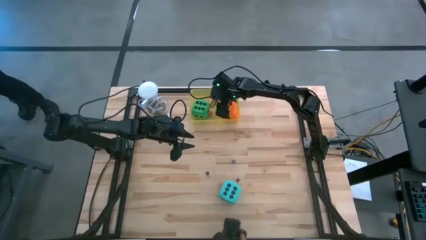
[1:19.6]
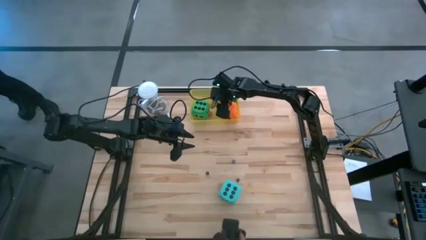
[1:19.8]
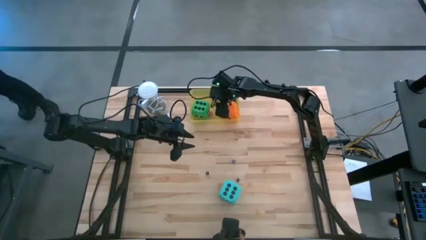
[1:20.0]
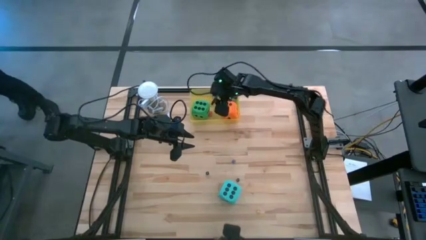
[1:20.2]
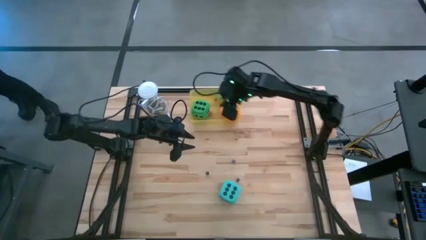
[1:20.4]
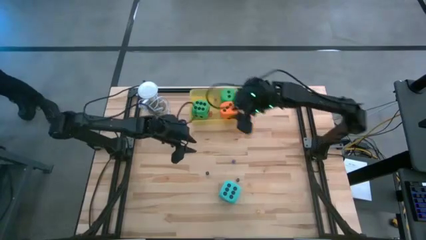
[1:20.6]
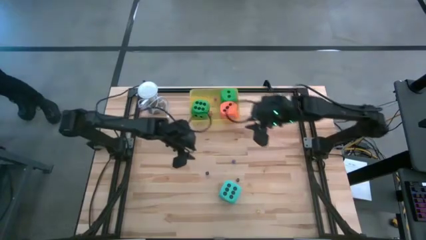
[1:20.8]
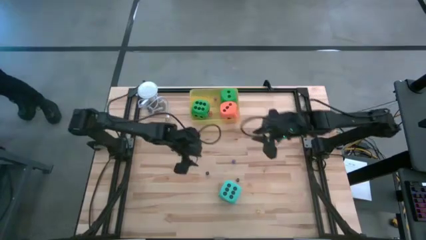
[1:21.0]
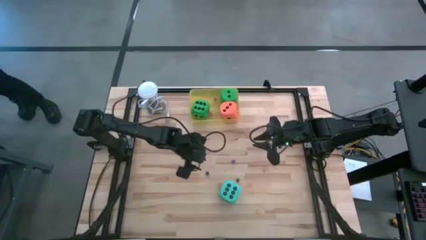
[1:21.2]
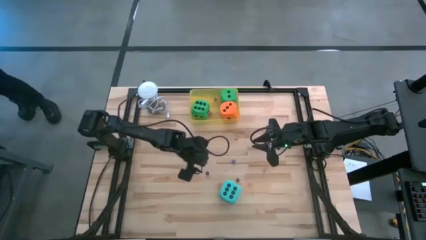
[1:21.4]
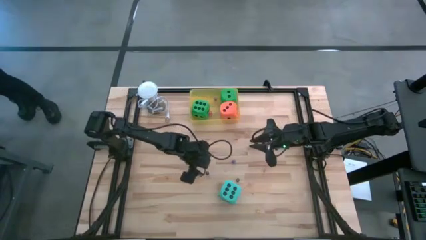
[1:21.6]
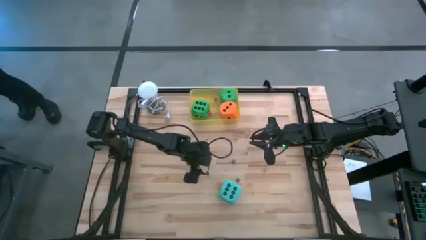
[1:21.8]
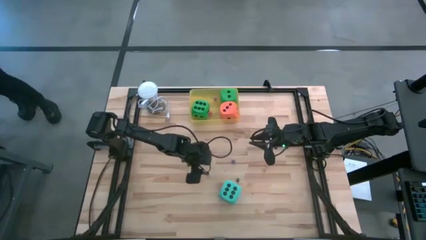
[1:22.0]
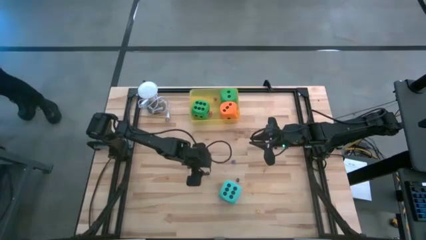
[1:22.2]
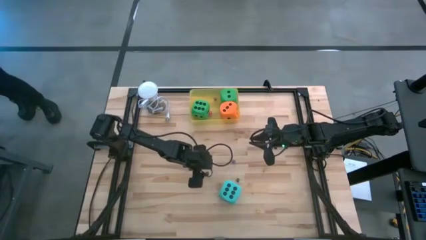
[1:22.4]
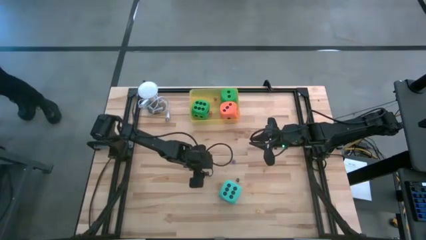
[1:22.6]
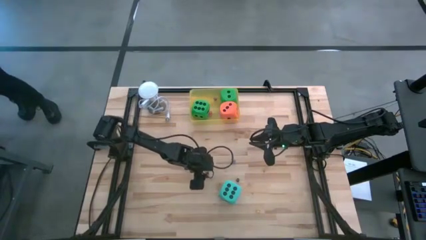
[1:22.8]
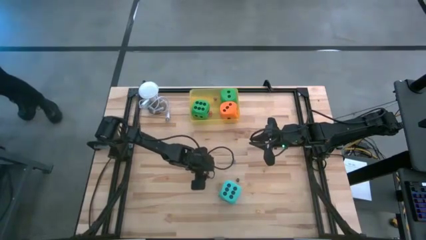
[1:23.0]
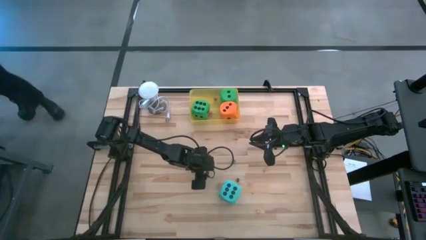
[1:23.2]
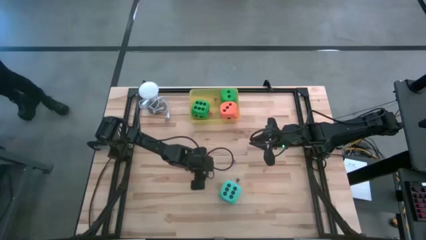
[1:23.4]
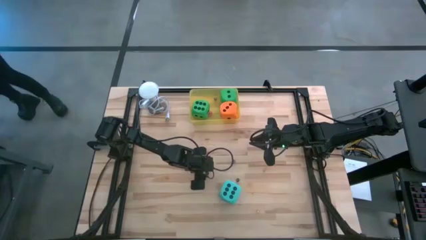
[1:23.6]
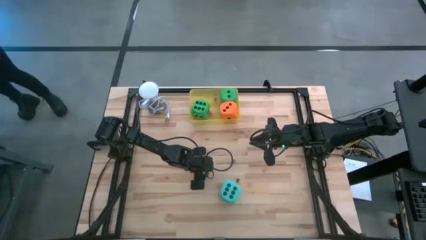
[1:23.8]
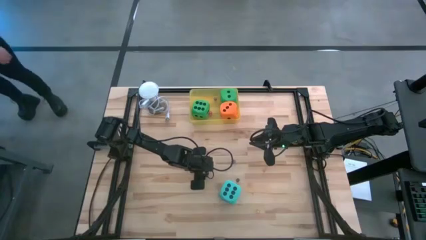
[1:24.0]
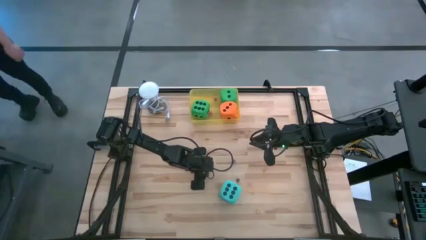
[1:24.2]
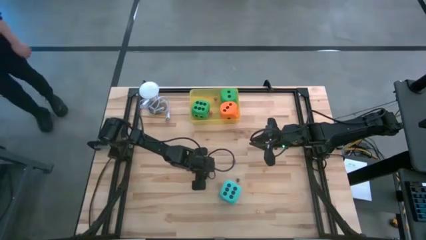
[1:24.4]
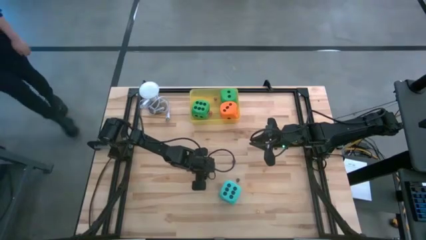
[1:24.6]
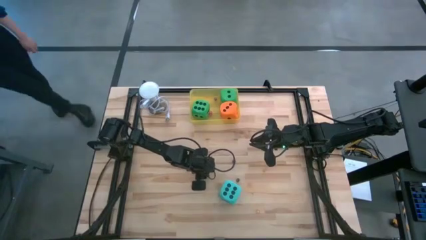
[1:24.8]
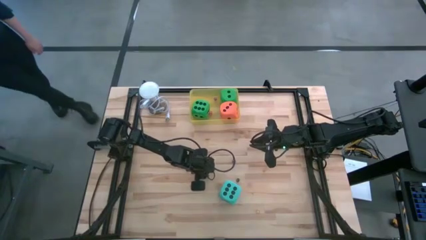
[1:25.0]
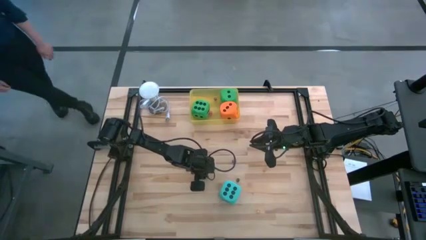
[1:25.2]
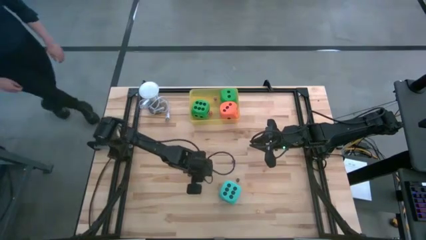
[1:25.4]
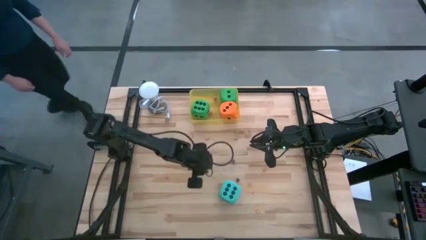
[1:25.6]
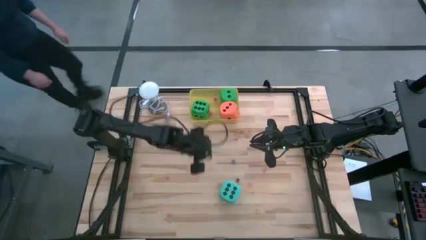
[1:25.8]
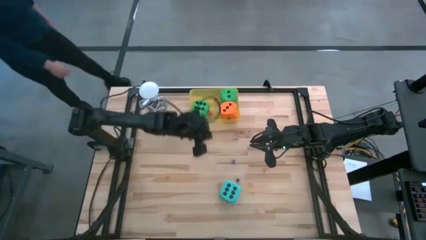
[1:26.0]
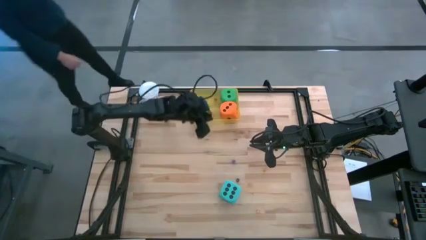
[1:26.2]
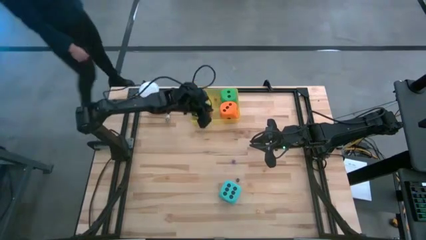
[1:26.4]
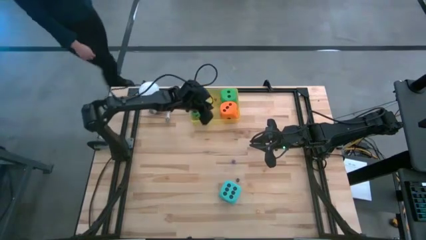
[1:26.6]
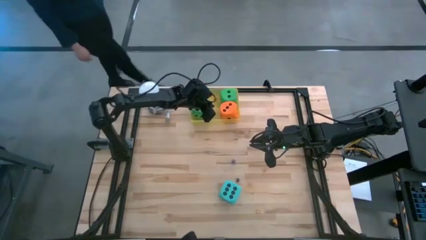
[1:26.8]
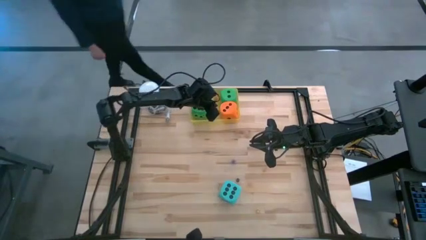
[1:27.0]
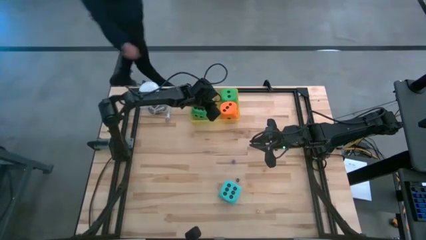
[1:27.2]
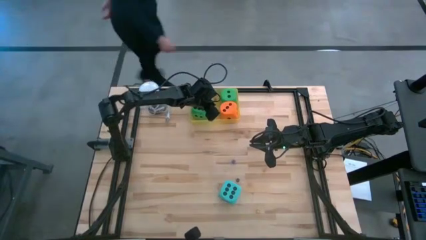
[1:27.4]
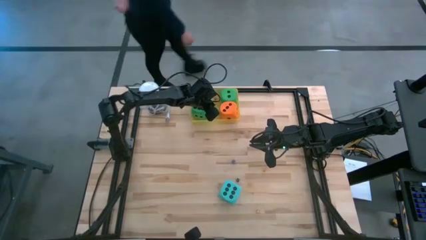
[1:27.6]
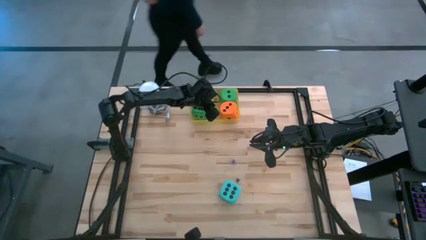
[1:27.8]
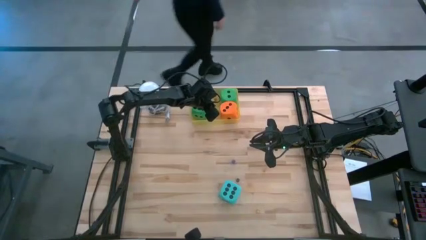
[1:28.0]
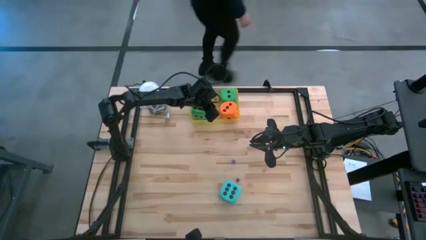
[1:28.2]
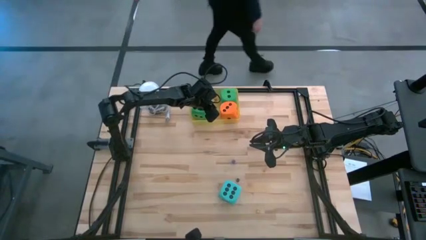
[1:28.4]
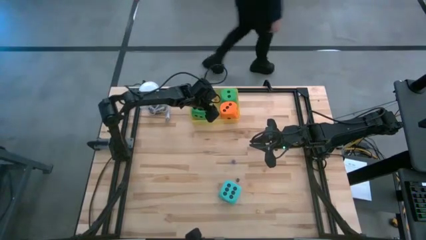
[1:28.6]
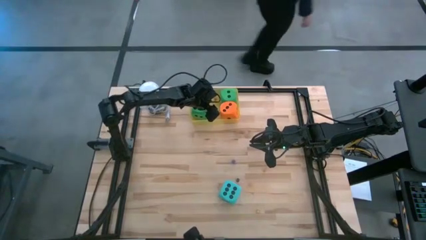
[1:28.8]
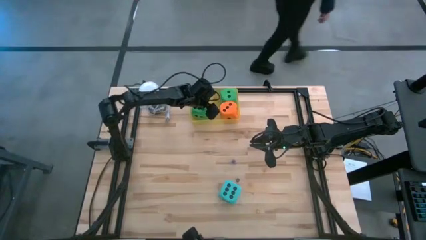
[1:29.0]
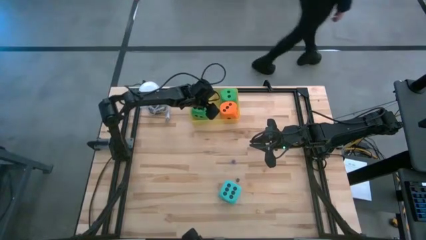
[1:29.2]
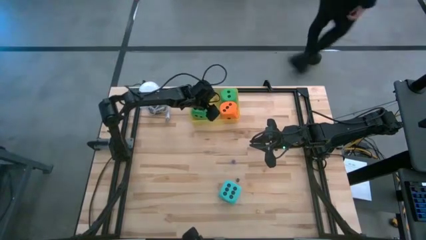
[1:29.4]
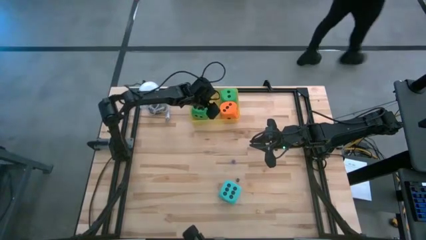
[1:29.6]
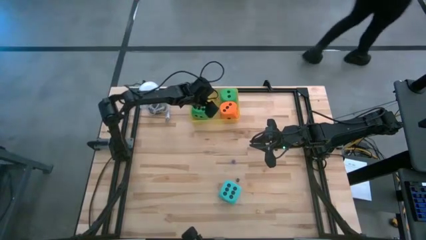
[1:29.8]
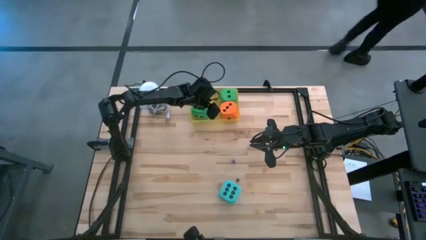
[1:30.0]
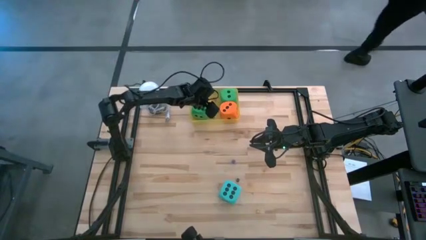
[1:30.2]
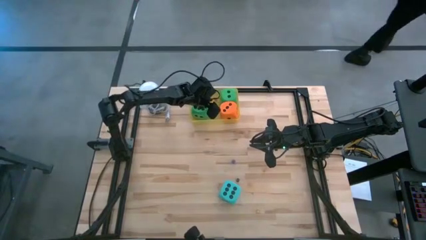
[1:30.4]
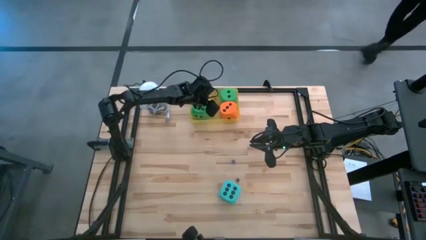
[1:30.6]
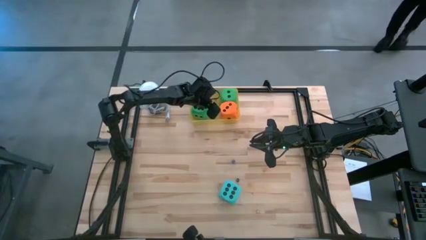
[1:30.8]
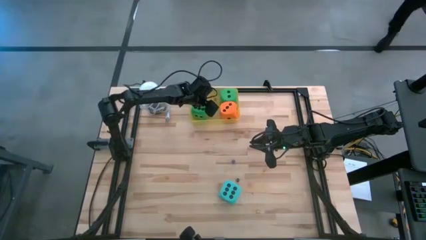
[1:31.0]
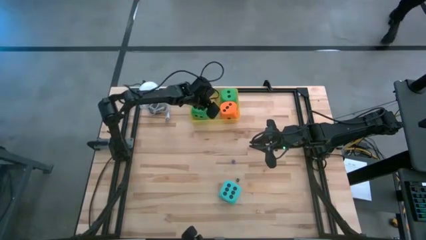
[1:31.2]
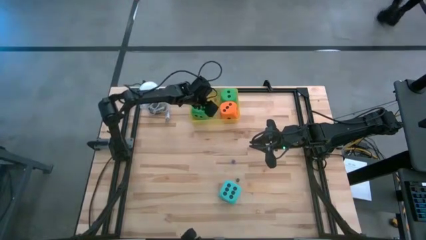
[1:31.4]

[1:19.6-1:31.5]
Task: Pick & Place Dice
Put the left black small die into the yellow bin
